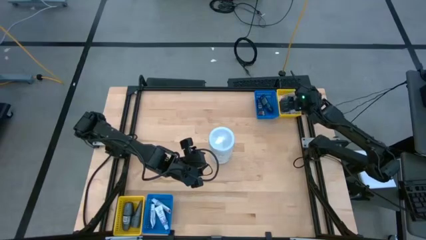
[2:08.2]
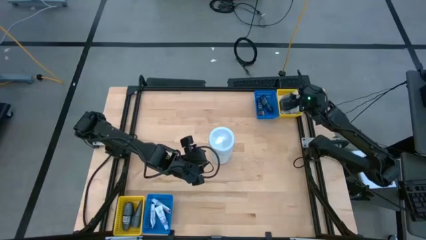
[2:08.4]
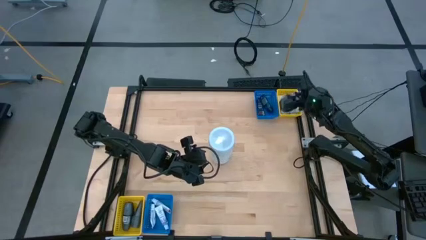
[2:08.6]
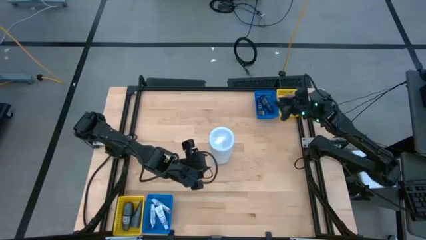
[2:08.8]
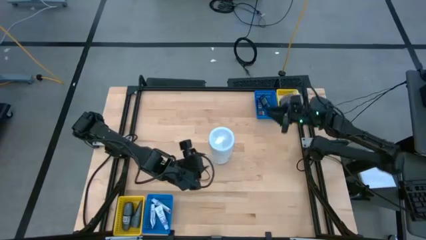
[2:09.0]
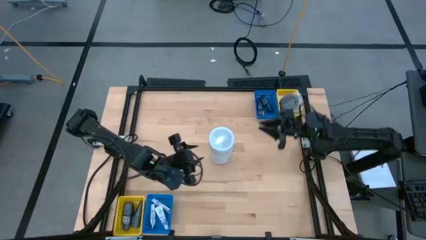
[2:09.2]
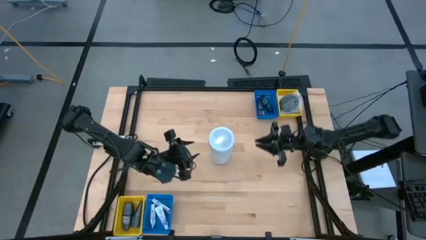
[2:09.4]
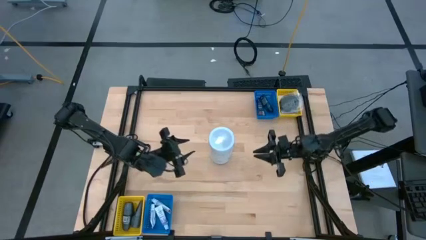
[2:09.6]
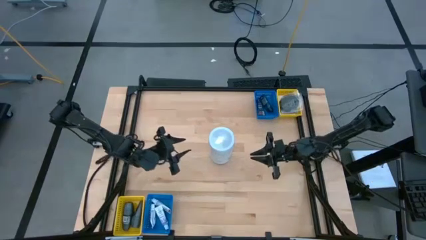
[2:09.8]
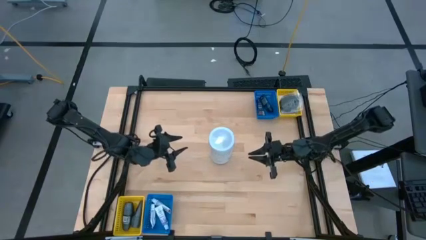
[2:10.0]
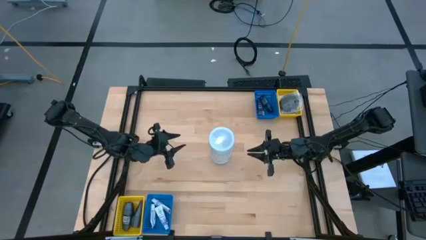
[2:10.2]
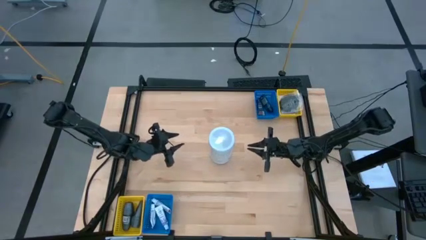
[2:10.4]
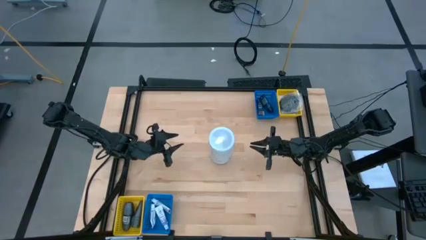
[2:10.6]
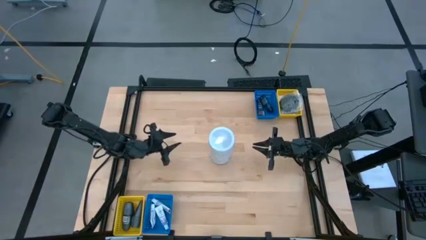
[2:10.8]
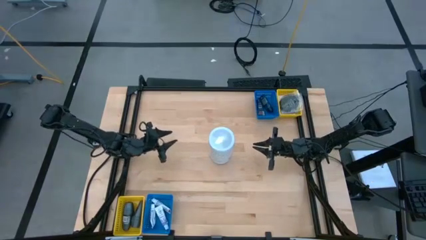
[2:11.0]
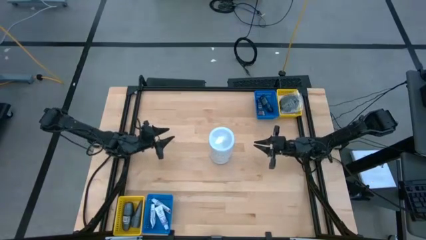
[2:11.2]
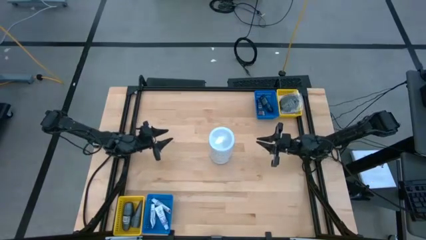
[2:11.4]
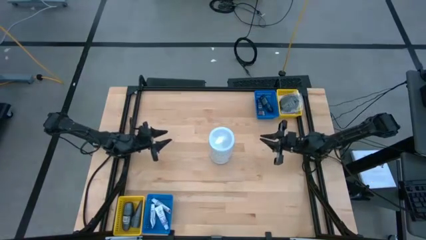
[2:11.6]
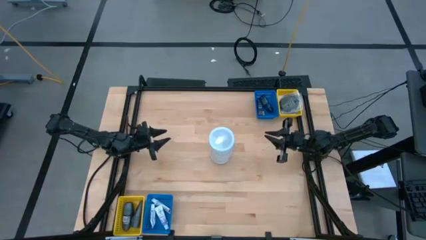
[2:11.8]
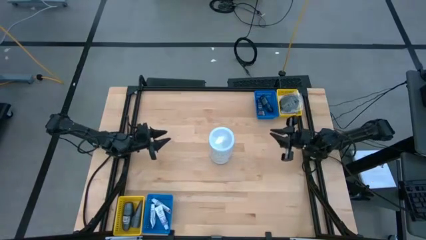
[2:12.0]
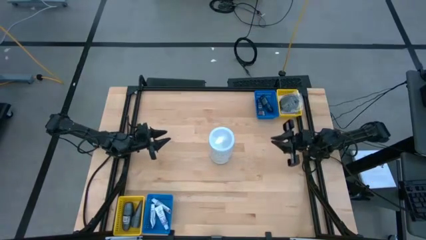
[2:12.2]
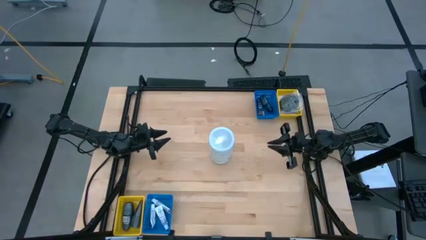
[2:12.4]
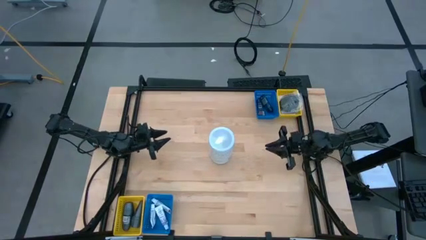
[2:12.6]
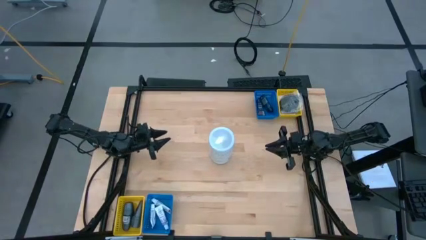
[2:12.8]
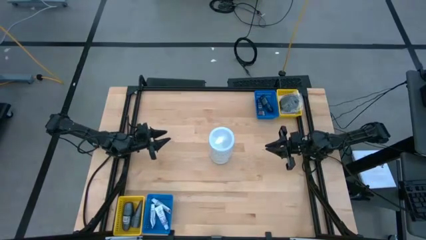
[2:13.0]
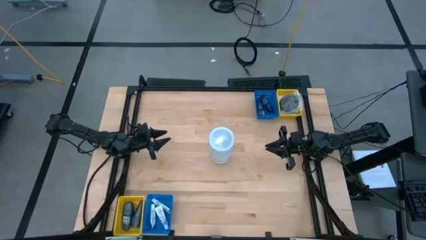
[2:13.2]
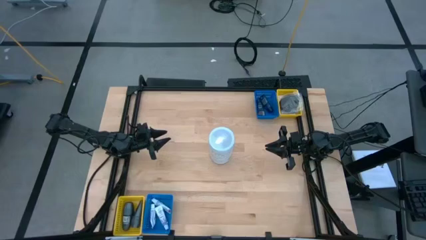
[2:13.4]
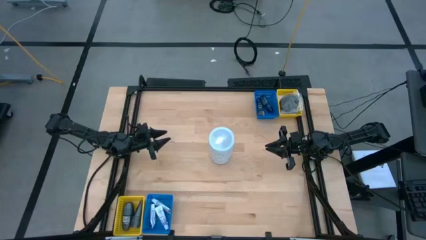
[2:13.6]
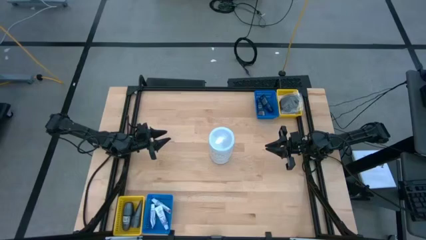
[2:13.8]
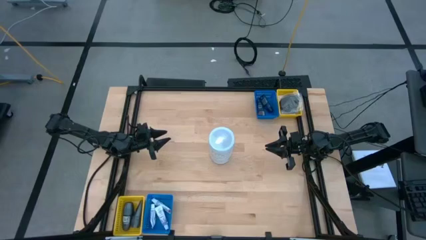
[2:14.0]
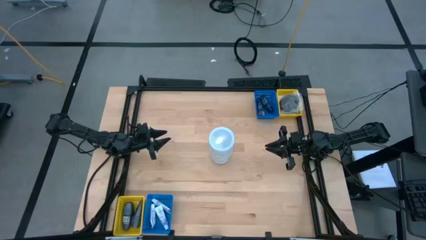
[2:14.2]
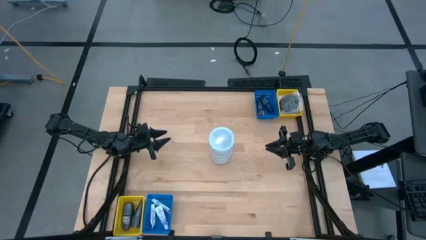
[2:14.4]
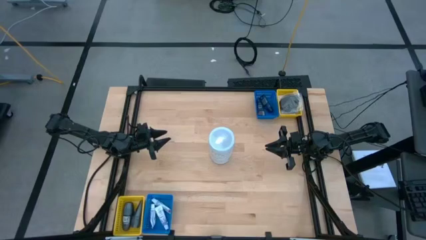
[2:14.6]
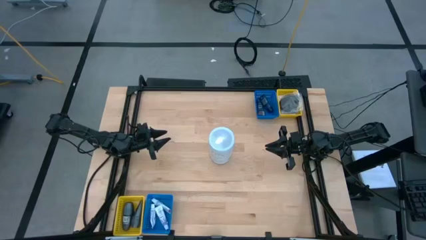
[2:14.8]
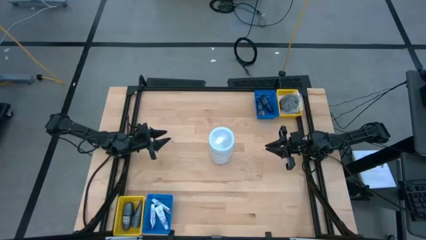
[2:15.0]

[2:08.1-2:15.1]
Task: Pick & Place Travel size toiletries
Return to Home Position

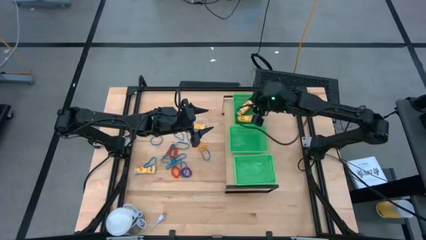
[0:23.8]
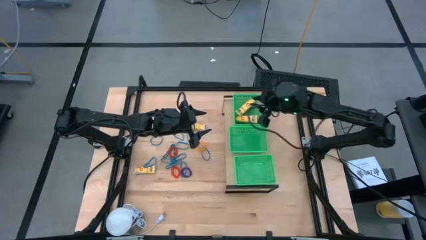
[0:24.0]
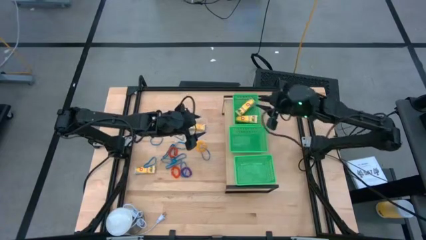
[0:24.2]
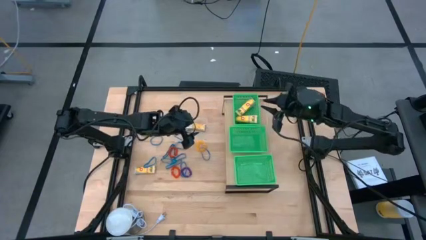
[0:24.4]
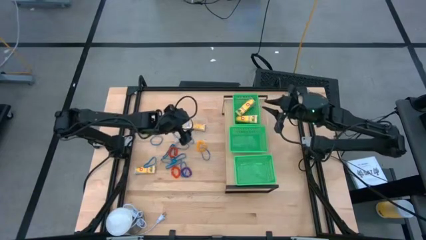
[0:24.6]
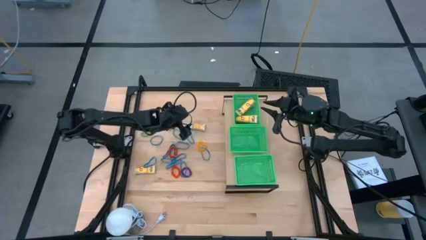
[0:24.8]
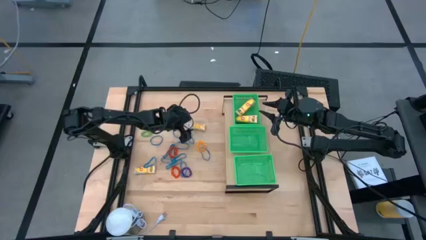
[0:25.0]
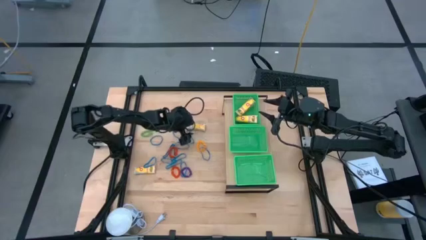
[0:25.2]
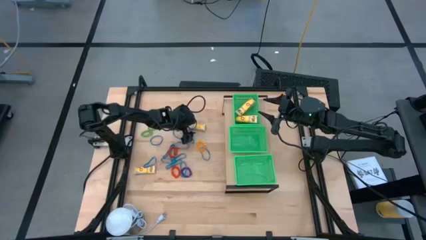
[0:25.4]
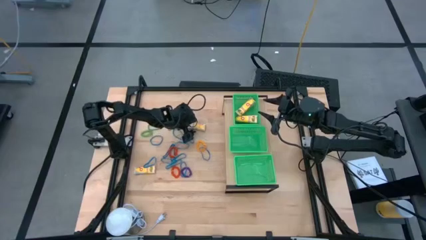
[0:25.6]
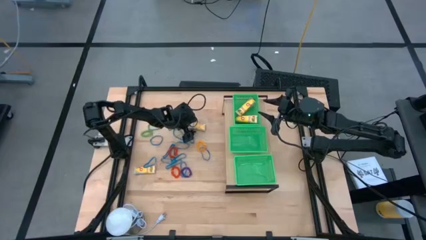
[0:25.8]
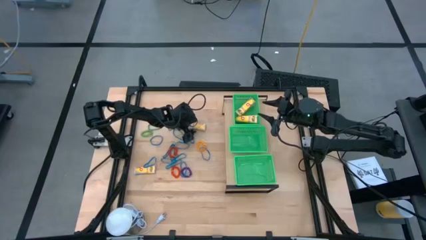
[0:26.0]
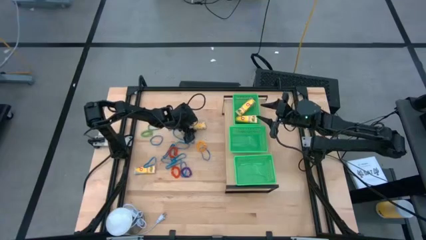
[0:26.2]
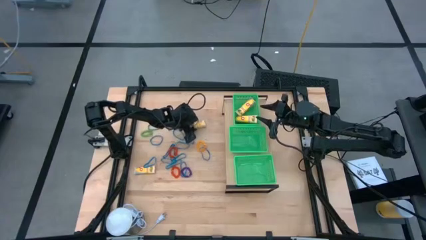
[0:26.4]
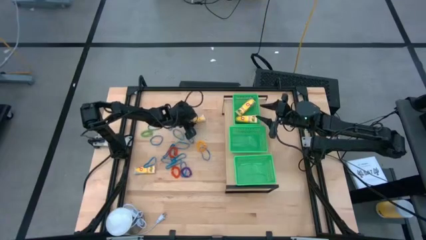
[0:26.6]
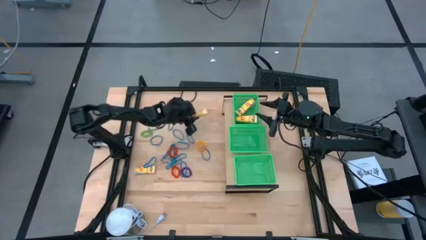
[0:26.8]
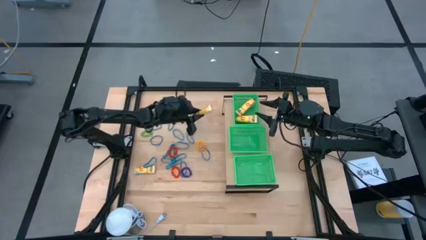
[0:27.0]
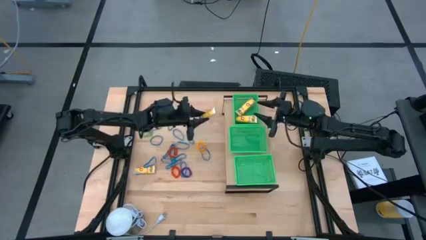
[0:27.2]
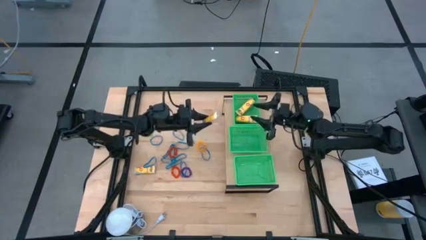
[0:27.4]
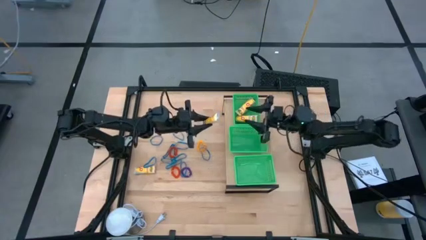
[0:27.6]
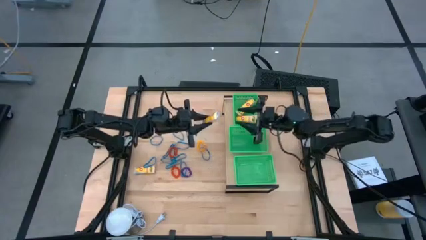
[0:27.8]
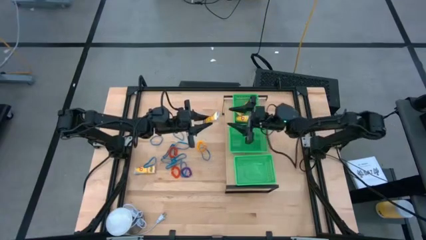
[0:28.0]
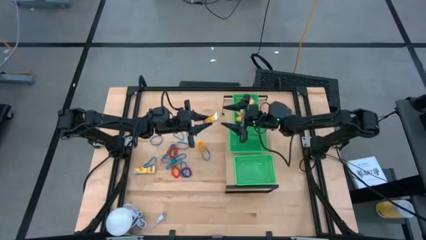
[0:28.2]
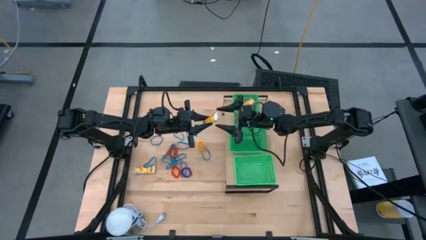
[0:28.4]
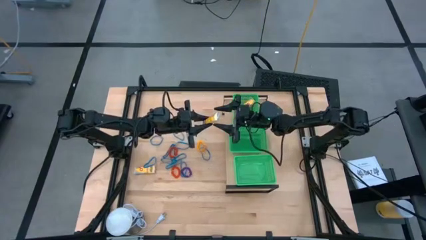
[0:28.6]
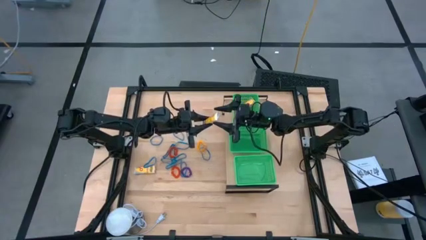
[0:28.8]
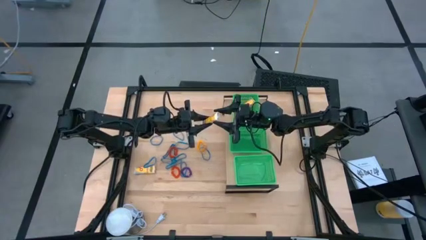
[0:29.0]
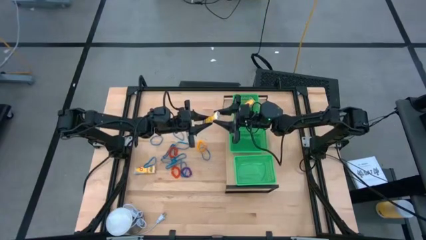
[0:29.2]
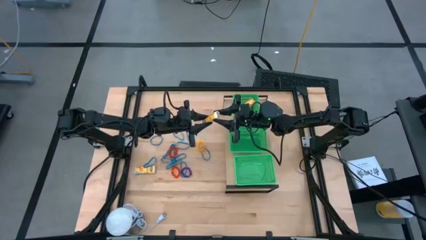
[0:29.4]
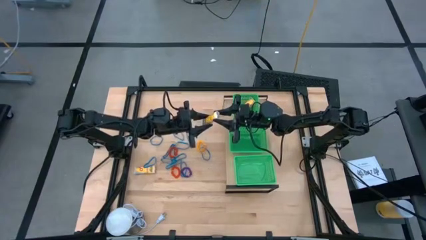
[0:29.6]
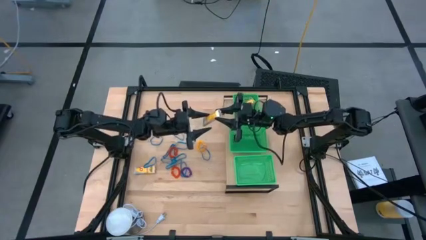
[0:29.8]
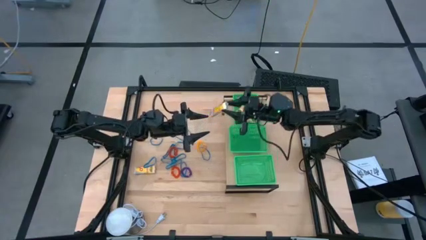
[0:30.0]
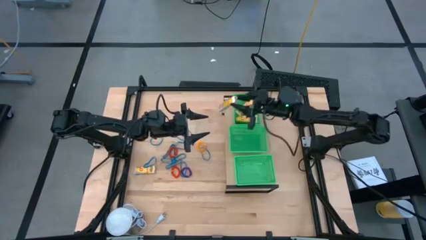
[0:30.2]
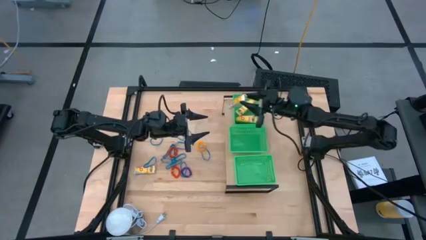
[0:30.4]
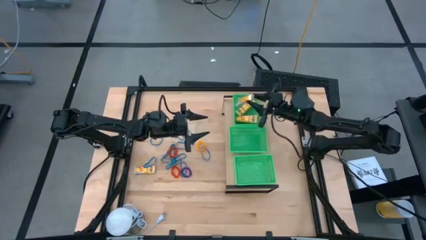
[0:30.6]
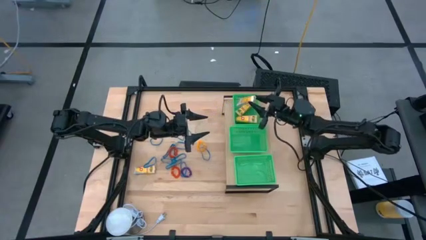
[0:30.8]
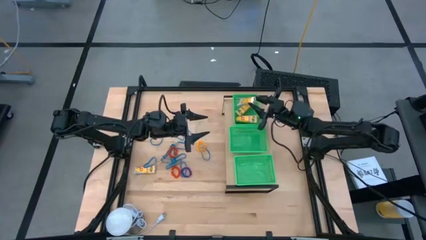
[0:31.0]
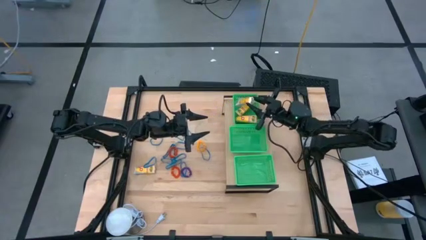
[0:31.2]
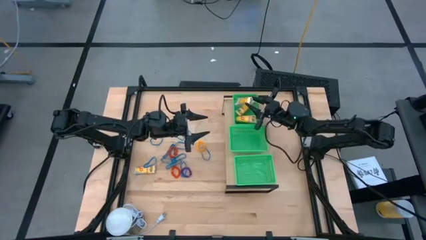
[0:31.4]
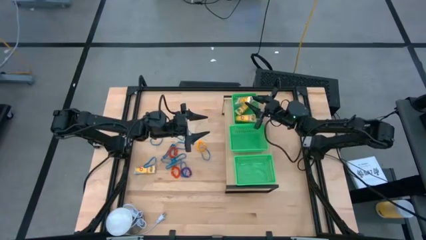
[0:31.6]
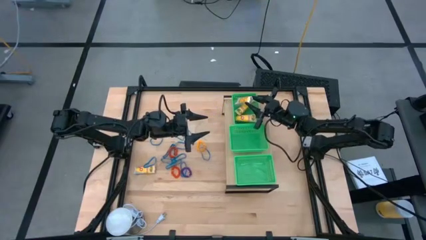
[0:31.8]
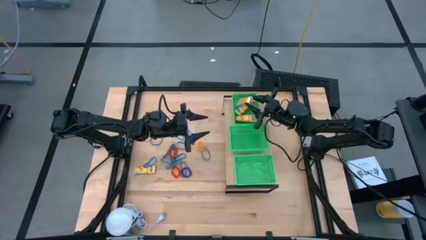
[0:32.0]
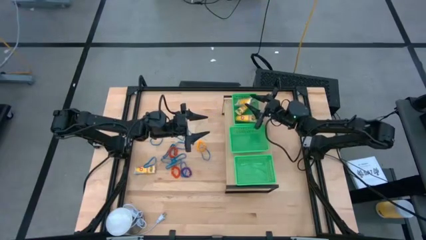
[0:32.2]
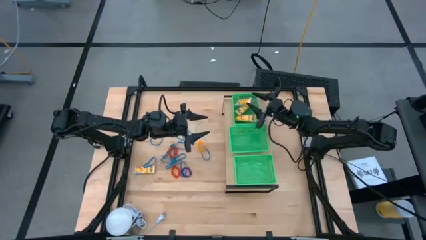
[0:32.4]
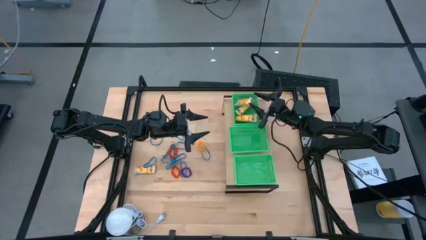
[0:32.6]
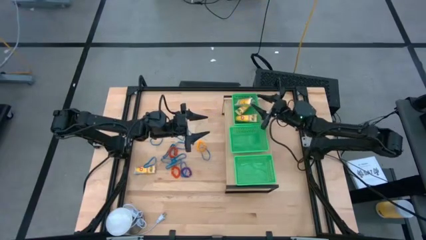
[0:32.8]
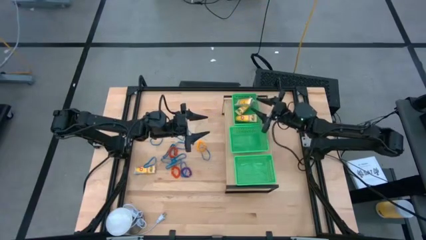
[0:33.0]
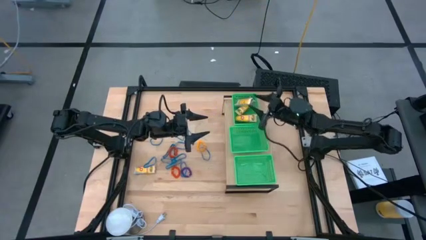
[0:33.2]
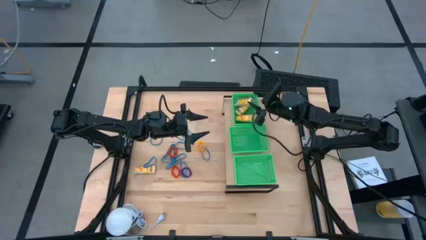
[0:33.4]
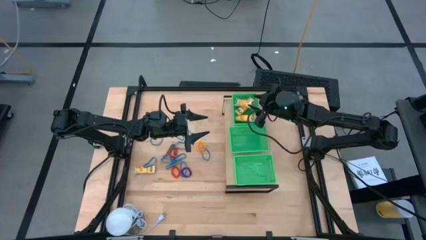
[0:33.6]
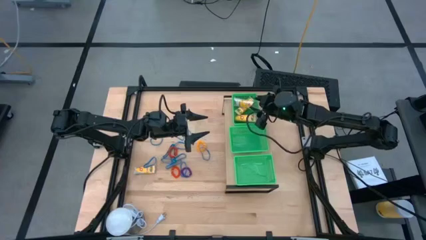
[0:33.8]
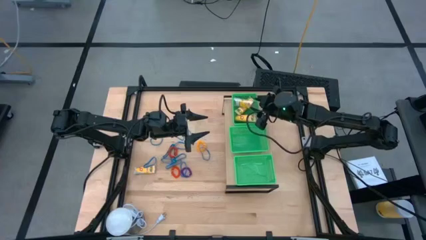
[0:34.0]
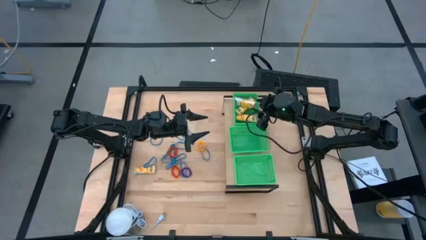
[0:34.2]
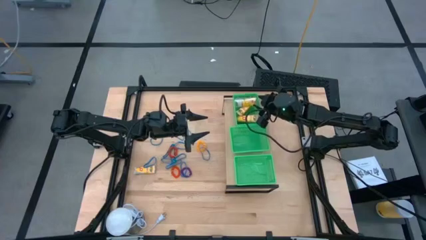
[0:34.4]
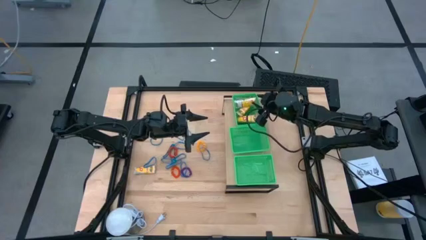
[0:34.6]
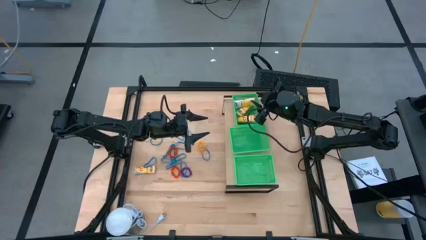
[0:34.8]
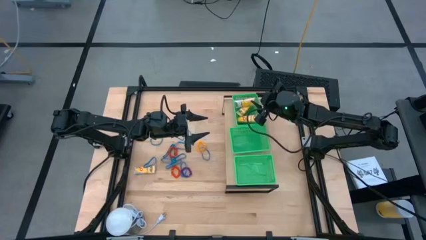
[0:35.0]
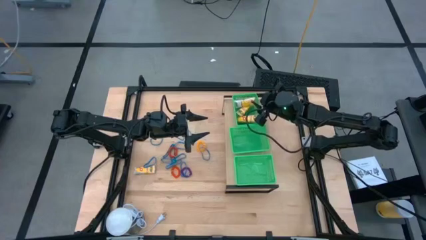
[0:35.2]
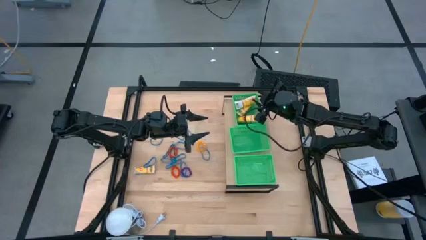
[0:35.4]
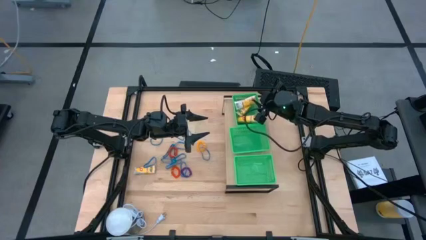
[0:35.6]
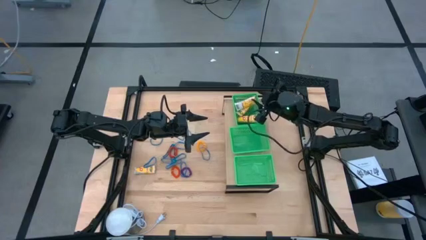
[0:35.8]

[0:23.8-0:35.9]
Task: Pick & Place Office Desk Supplies
Put the yellow crayon box into the top green bin
